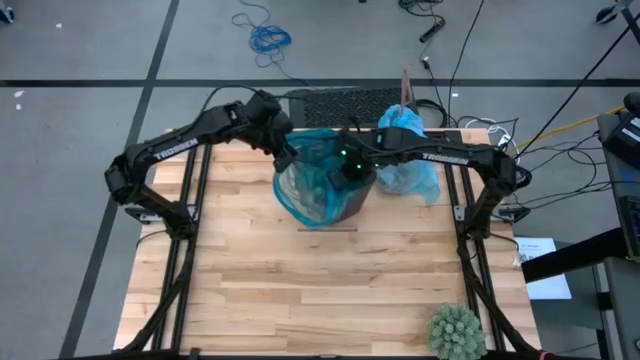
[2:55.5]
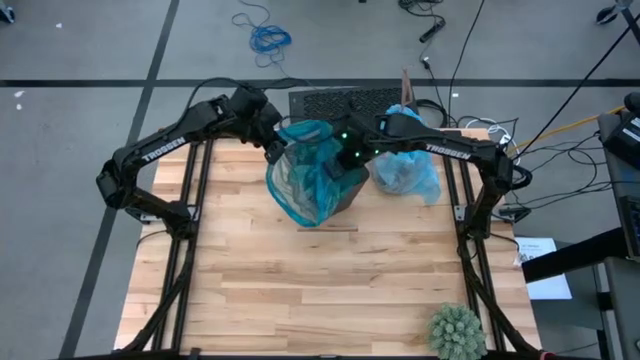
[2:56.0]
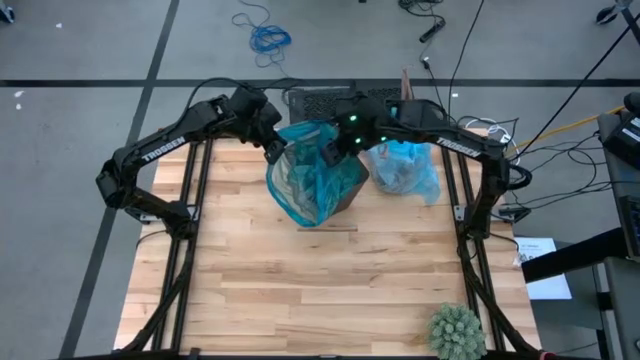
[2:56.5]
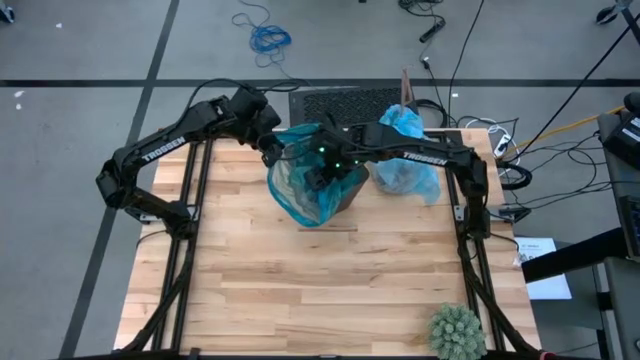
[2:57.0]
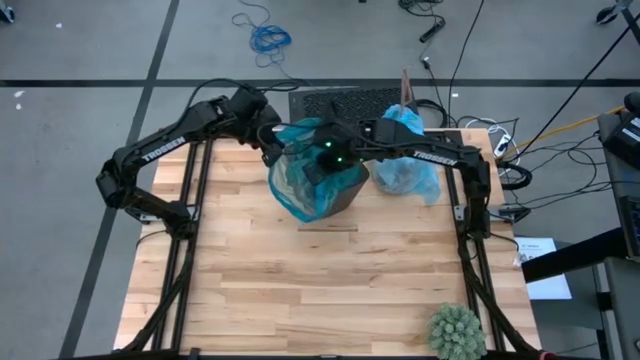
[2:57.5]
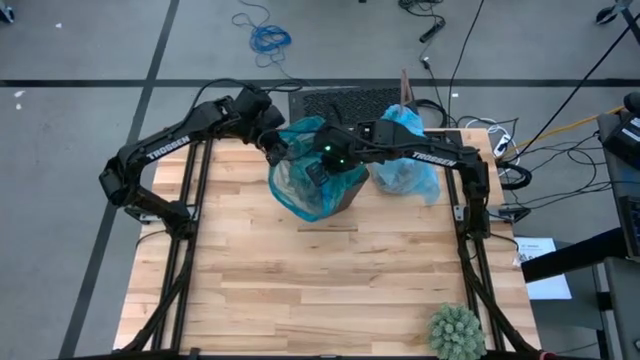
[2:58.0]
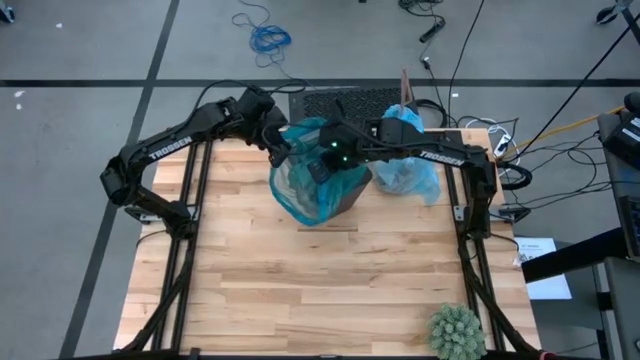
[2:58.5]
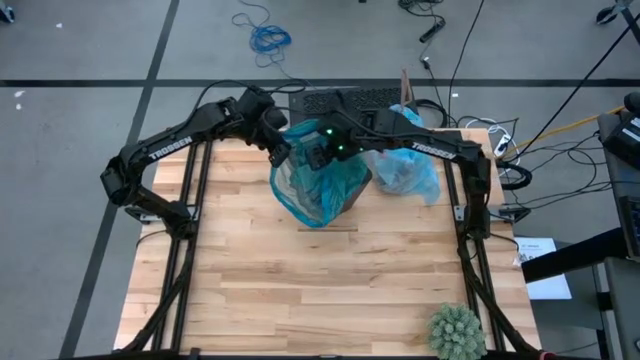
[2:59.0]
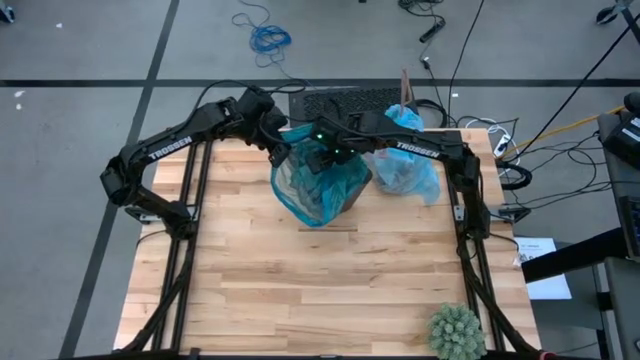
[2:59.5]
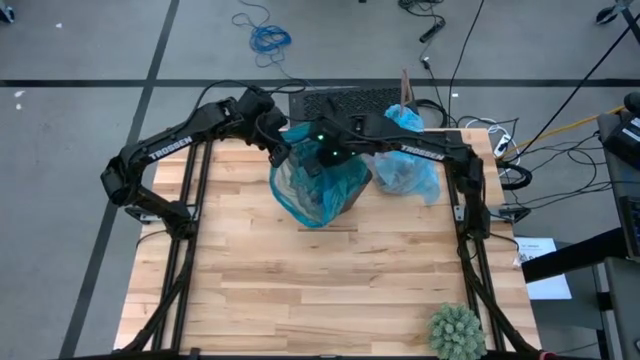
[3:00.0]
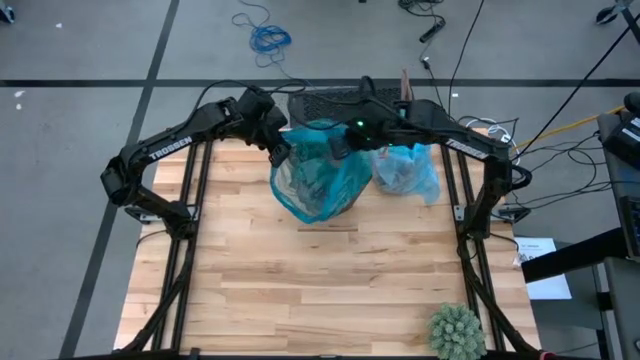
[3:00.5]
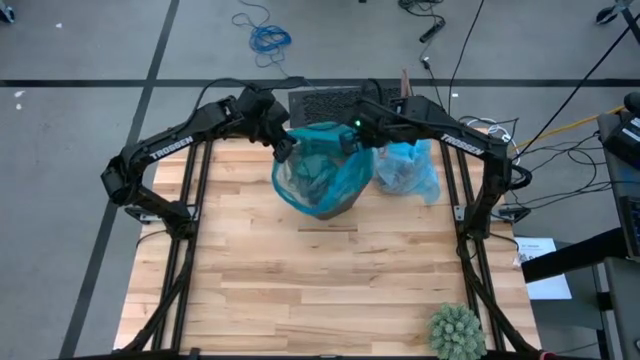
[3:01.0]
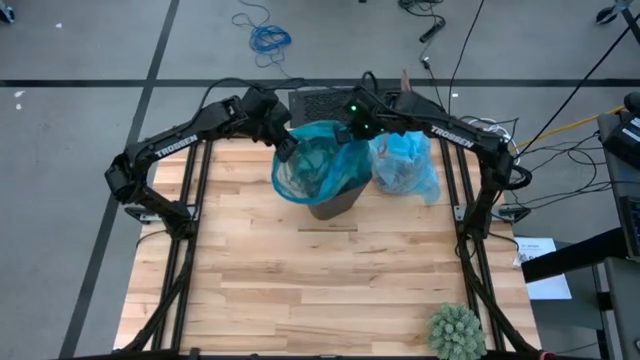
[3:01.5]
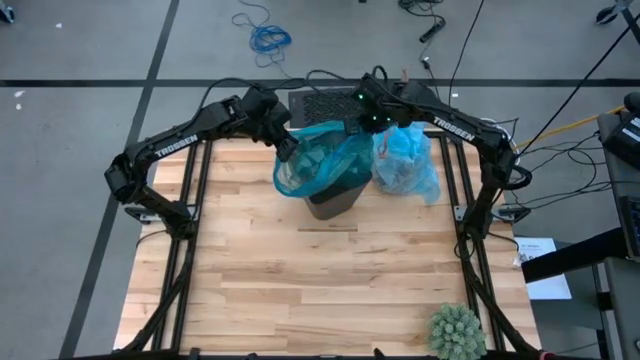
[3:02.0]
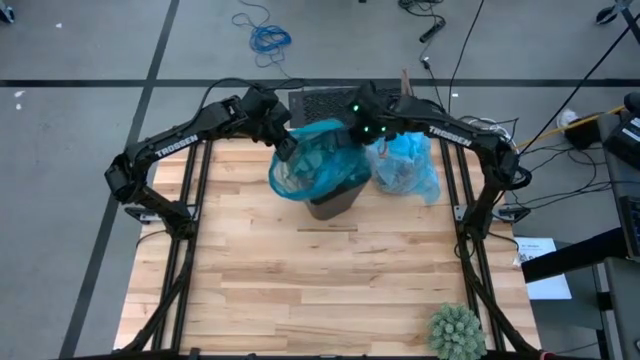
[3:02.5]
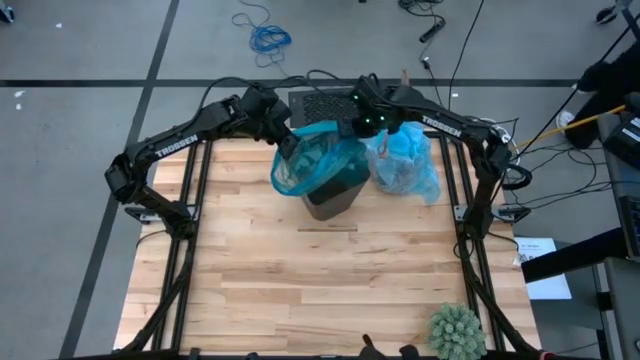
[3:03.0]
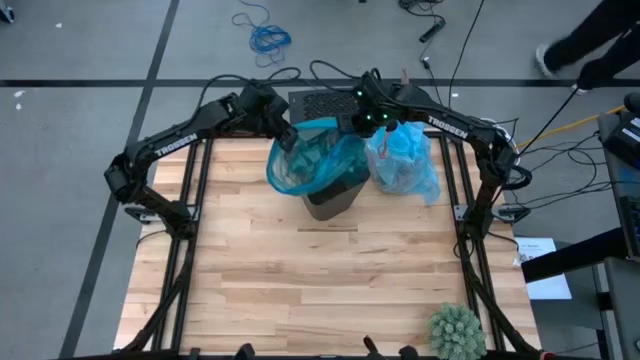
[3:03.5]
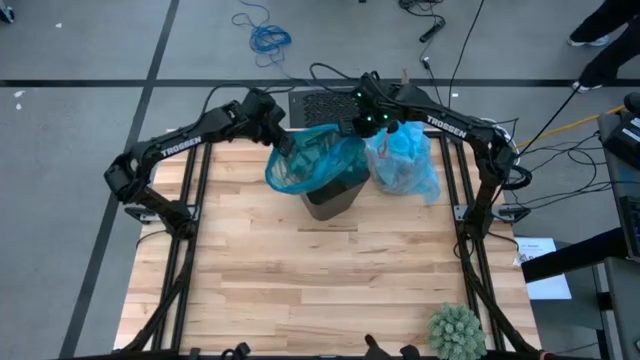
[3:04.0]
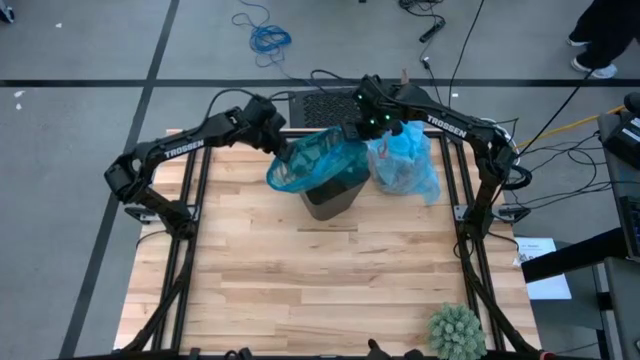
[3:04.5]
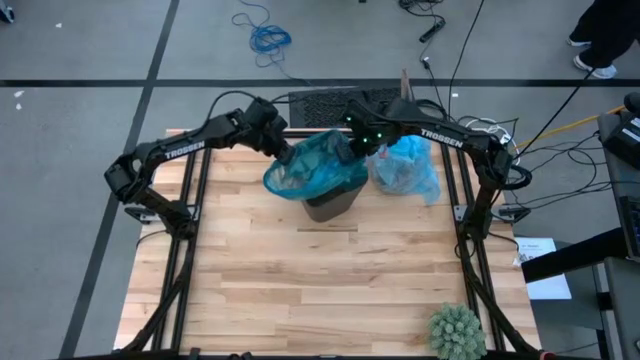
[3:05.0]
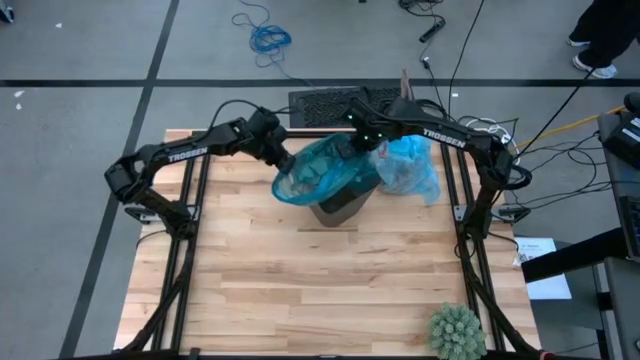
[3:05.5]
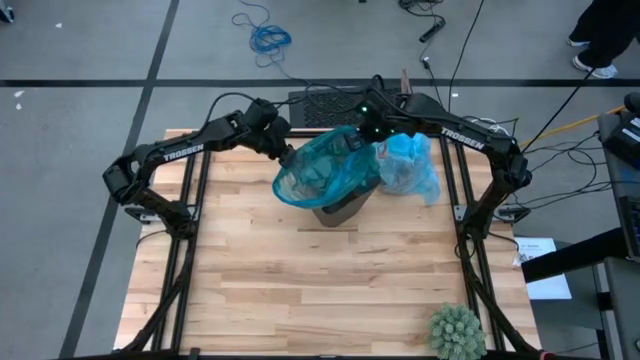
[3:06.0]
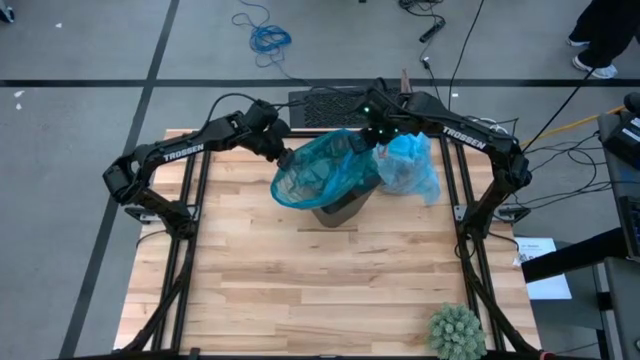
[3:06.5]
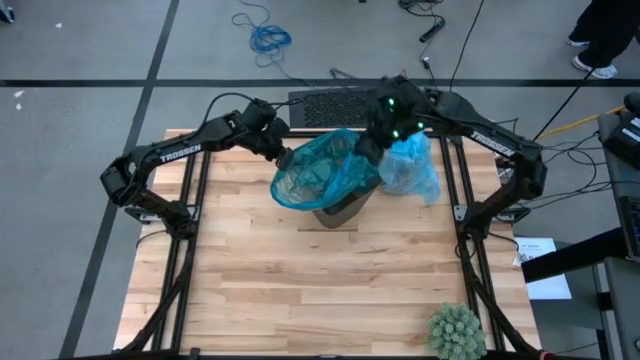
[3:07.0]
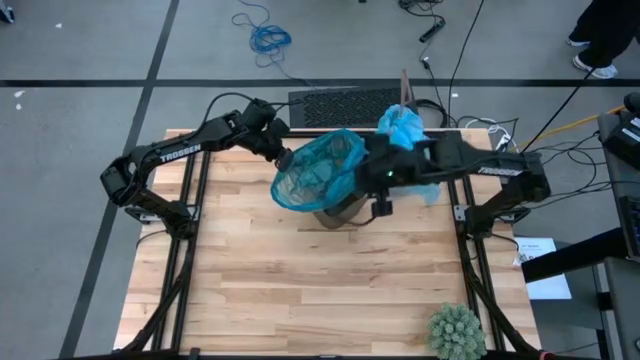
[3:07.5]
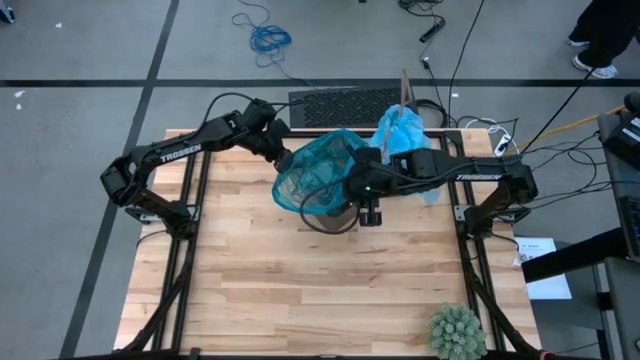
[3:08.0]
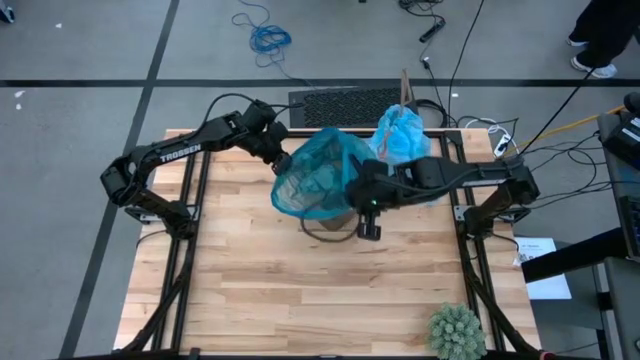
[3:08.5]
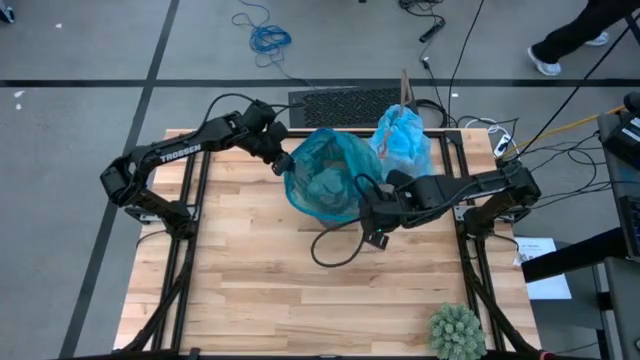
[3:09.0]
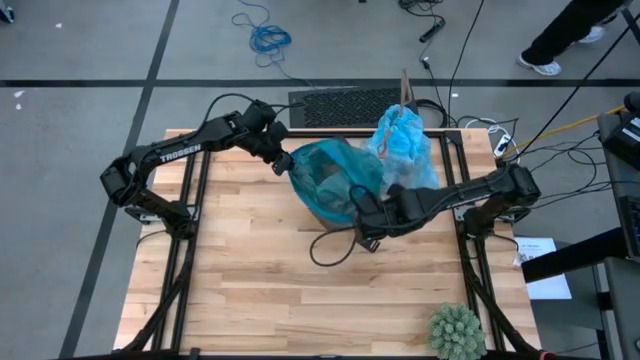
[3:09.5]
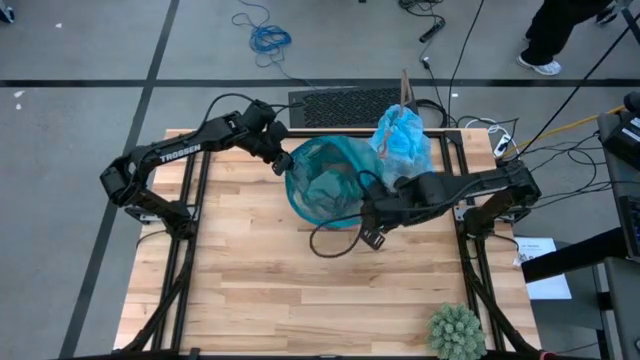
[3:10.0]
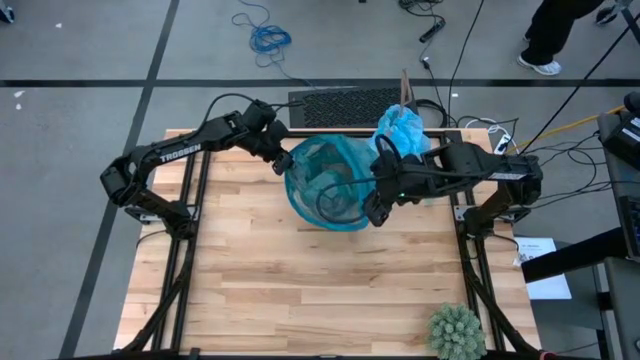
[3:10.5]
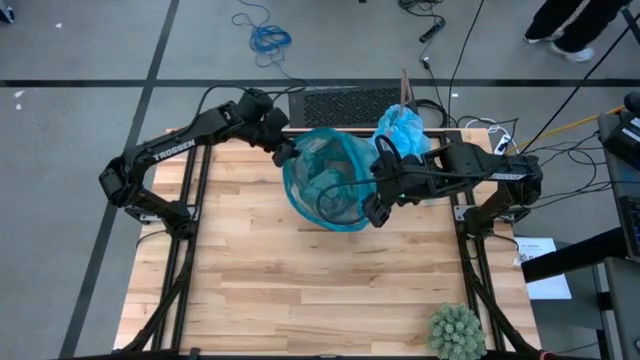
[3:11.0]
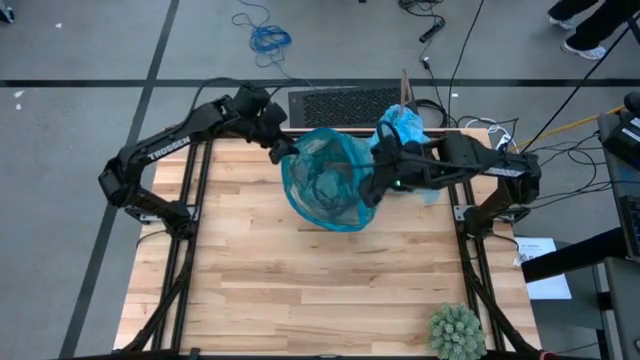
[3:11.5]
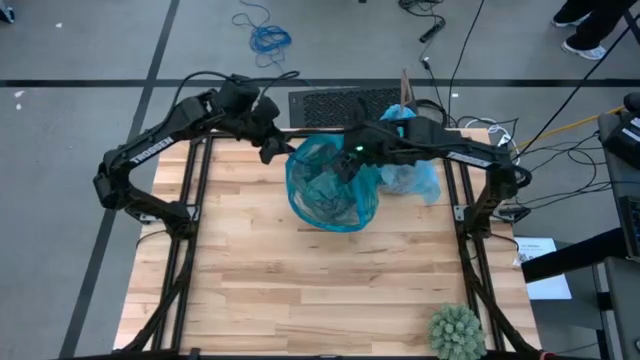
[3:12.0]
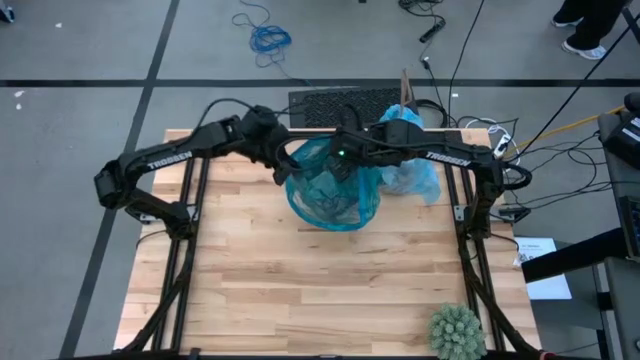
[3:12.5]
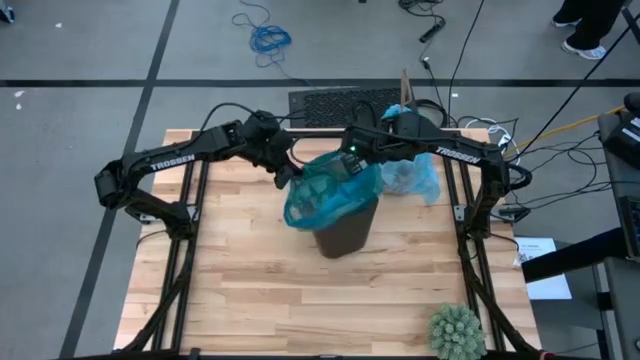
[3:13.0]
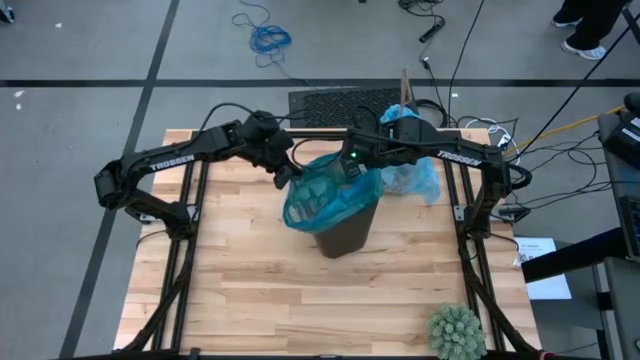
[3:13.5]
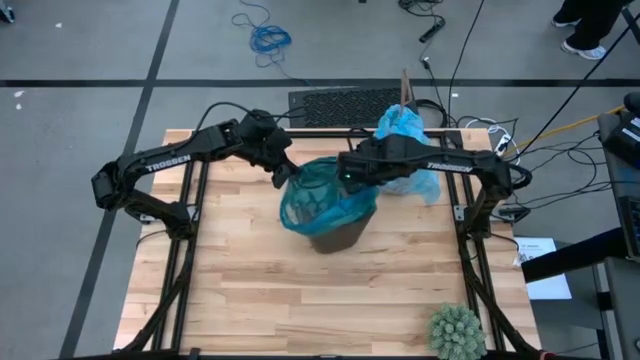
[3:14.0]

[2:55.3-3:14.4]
Task: place trash/remove bag and relplace
Insert the dark blue trash bag into the trash bin

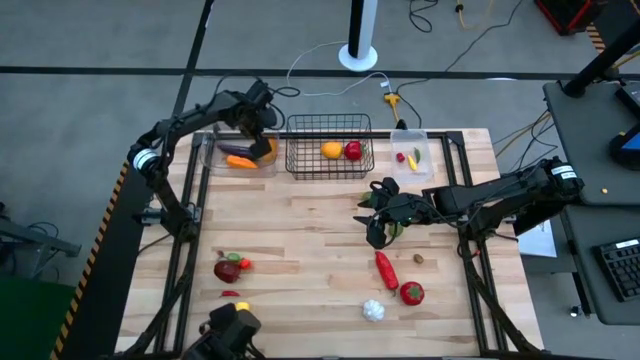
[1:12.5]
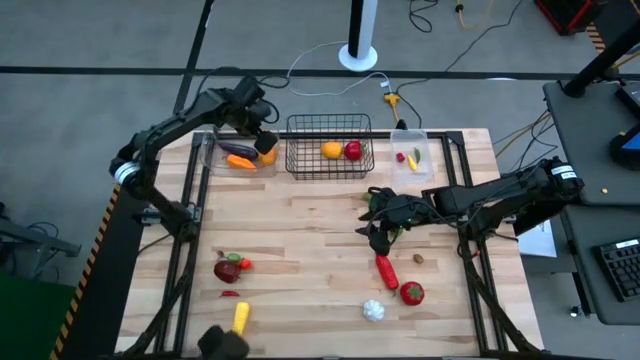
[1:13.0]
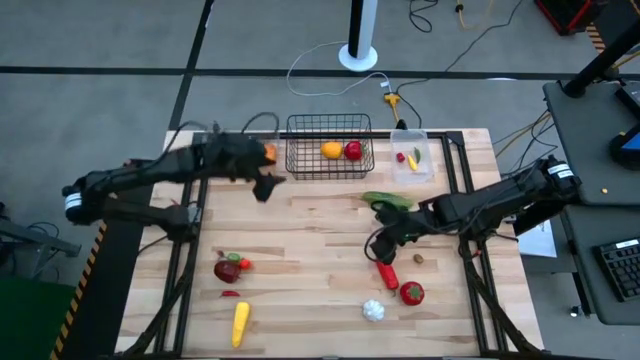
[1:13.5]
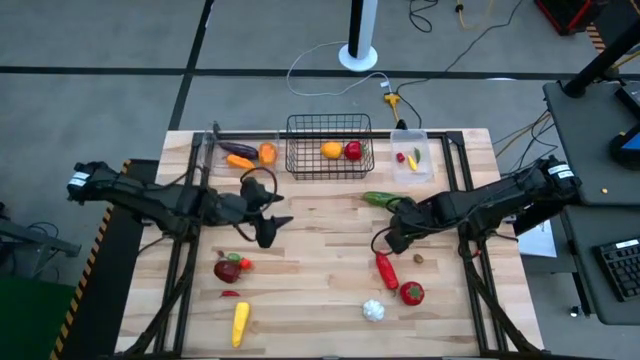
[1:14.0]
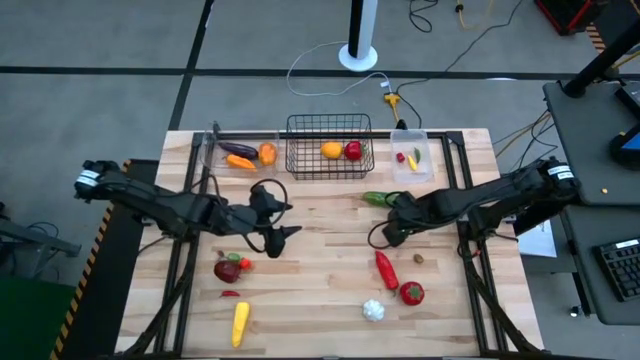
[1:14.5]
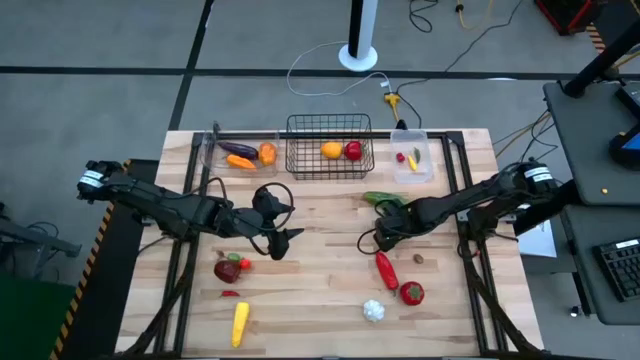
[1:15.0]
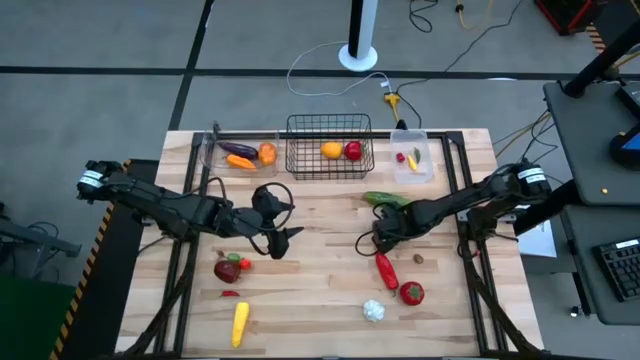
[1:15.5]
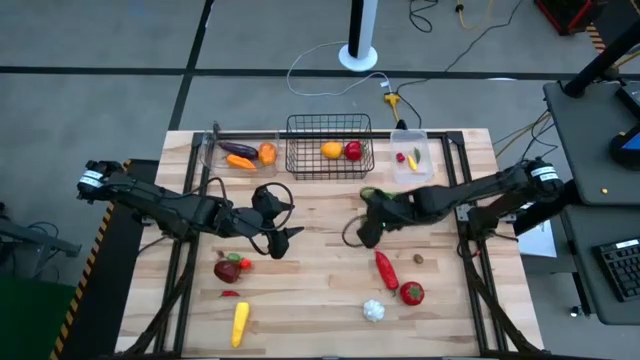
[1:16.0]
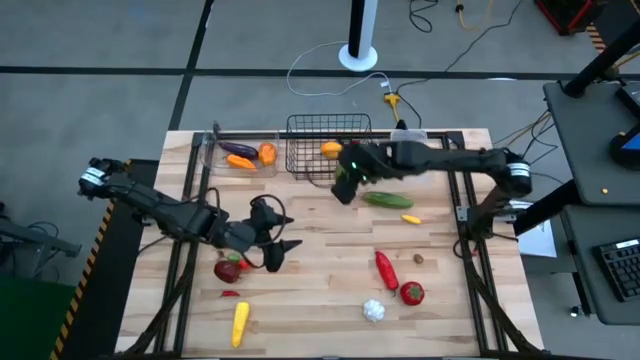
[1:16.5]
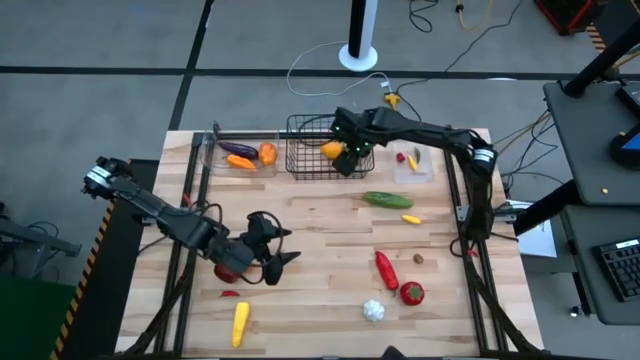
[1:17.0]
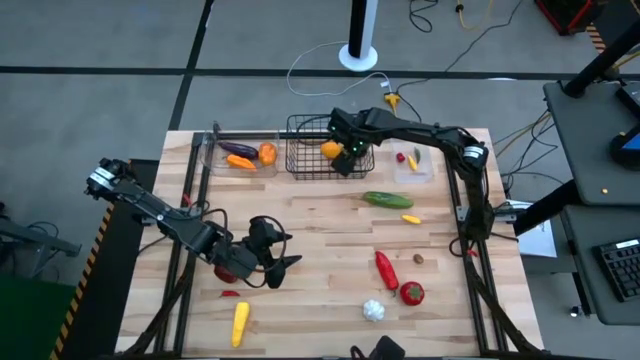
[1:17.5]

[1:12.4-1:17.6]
Task: Sort produce into baskets
Put the lime into the wire basket
